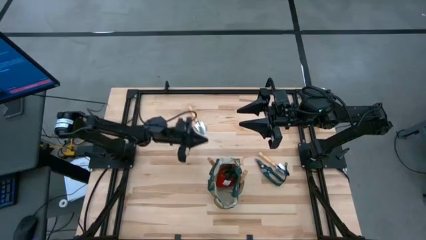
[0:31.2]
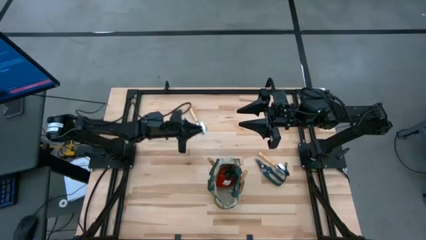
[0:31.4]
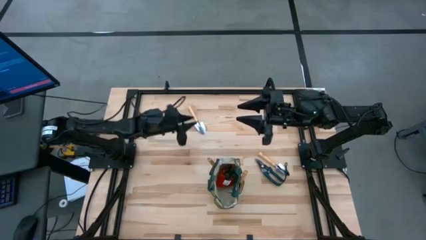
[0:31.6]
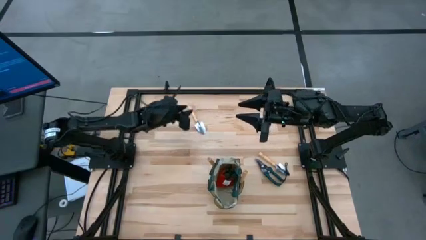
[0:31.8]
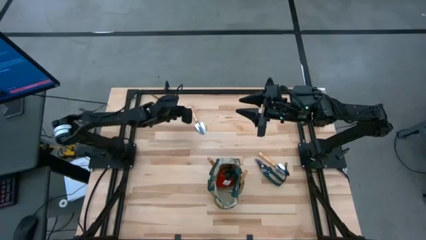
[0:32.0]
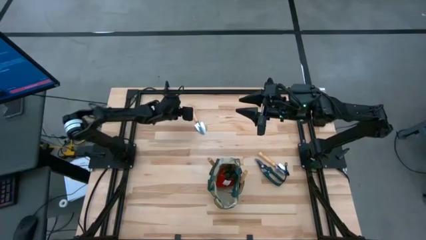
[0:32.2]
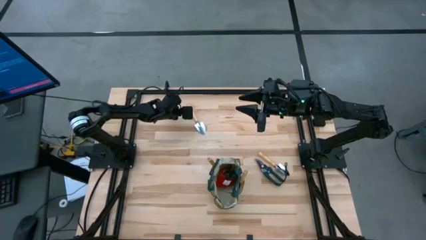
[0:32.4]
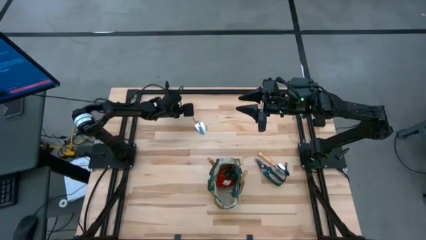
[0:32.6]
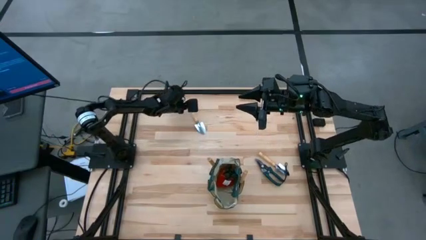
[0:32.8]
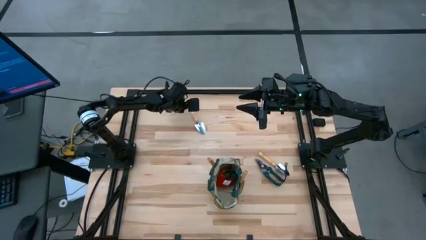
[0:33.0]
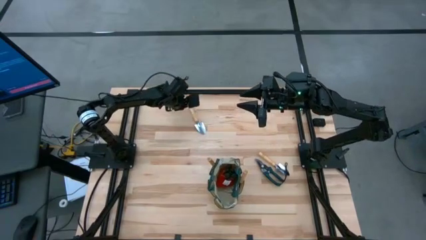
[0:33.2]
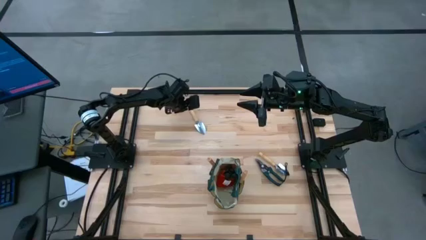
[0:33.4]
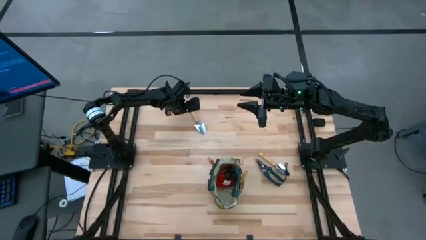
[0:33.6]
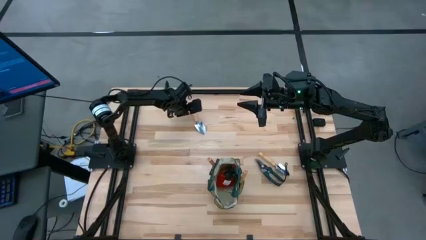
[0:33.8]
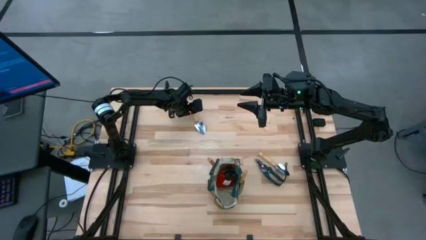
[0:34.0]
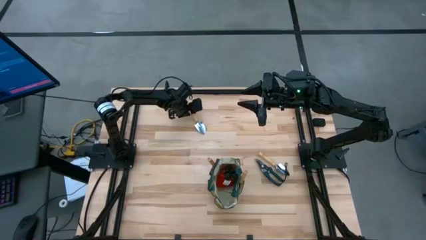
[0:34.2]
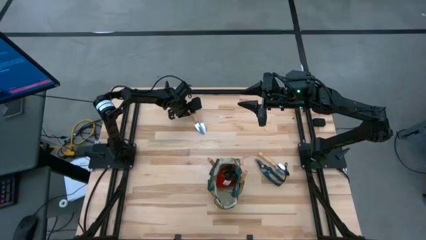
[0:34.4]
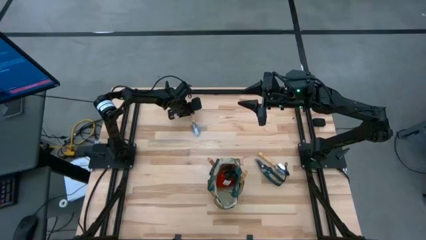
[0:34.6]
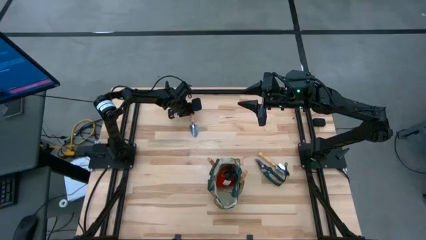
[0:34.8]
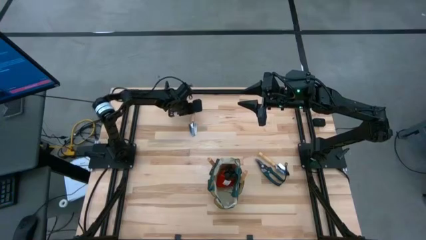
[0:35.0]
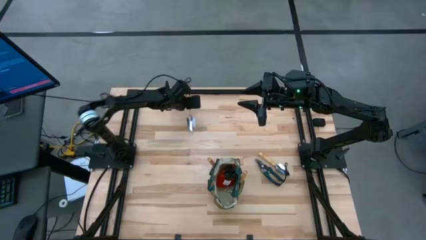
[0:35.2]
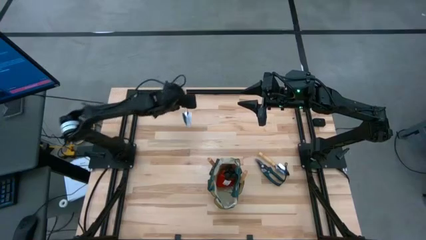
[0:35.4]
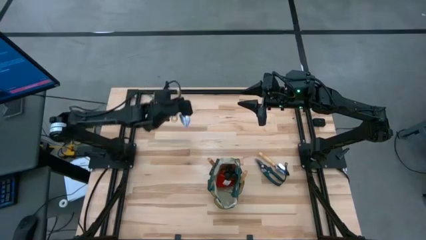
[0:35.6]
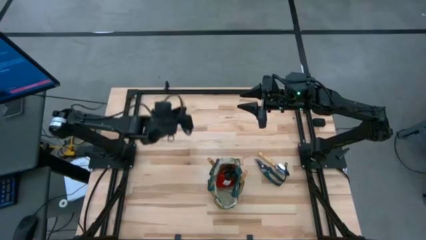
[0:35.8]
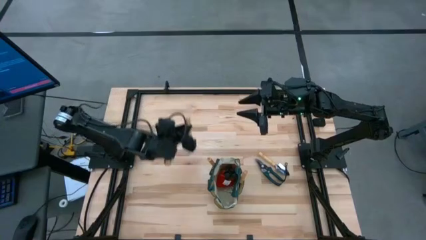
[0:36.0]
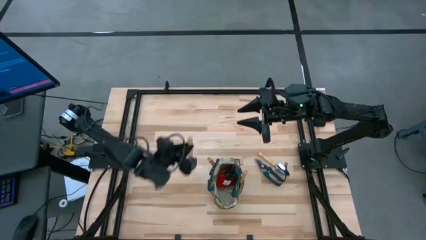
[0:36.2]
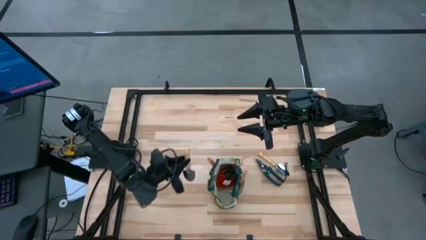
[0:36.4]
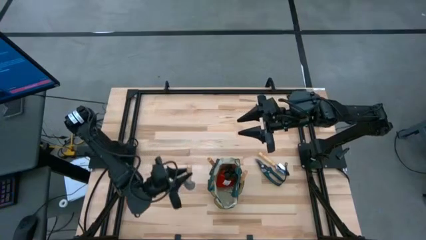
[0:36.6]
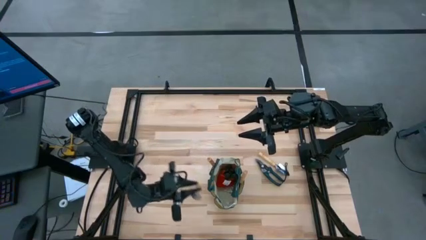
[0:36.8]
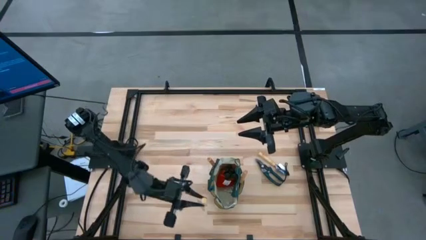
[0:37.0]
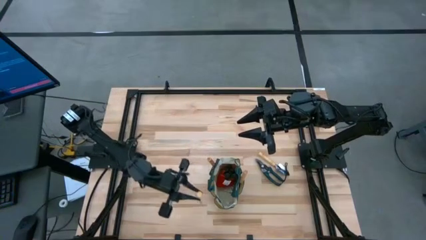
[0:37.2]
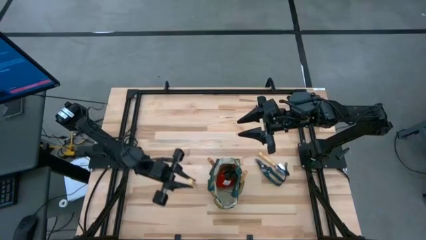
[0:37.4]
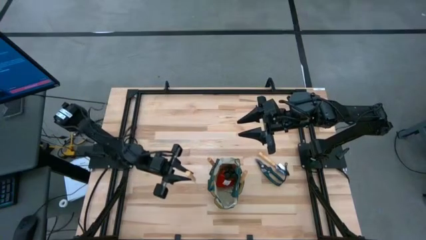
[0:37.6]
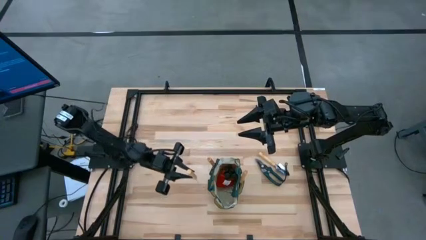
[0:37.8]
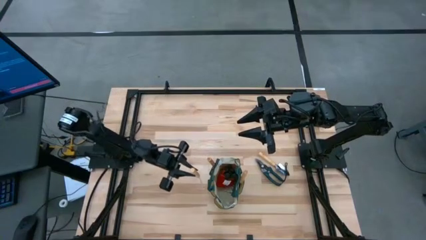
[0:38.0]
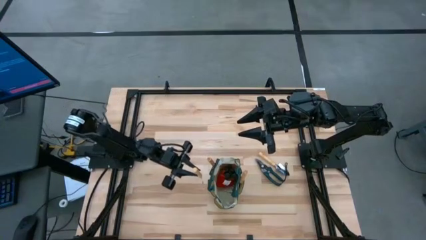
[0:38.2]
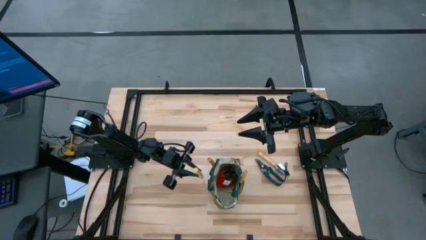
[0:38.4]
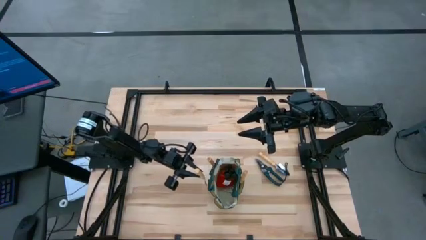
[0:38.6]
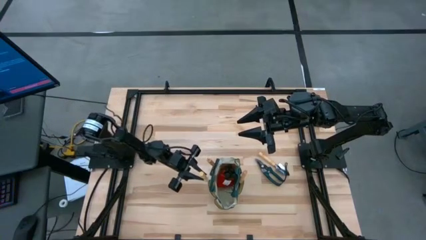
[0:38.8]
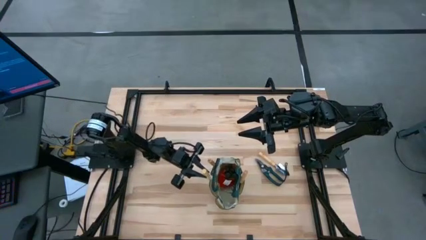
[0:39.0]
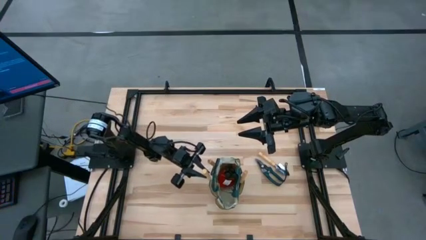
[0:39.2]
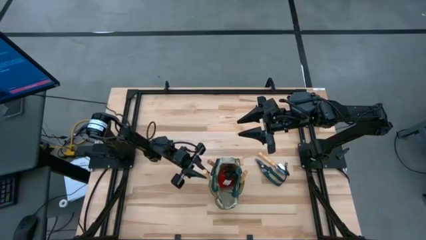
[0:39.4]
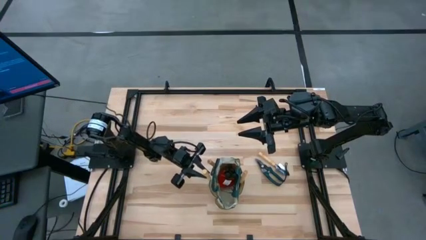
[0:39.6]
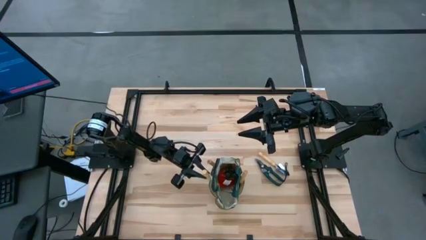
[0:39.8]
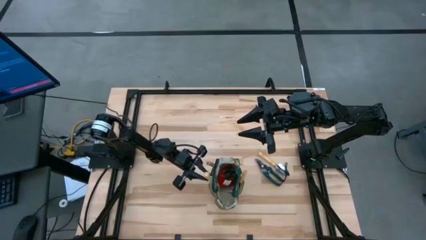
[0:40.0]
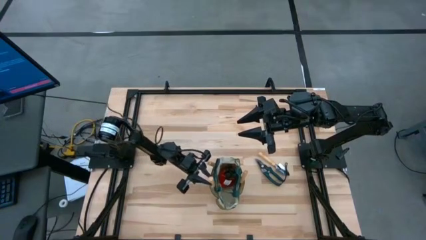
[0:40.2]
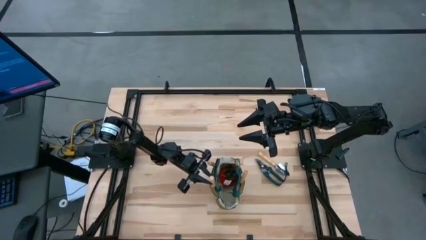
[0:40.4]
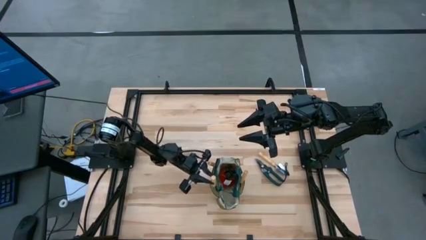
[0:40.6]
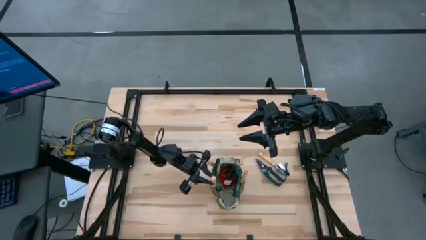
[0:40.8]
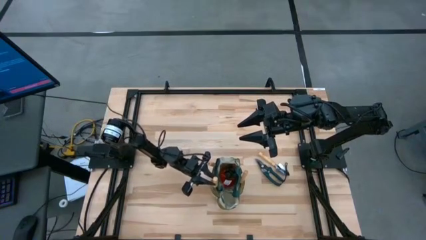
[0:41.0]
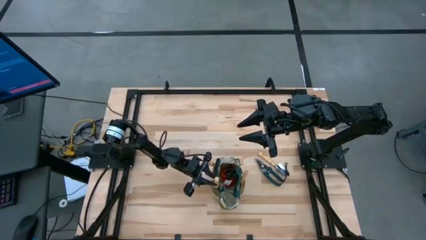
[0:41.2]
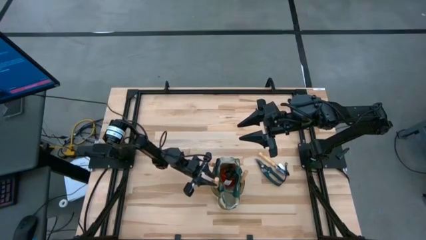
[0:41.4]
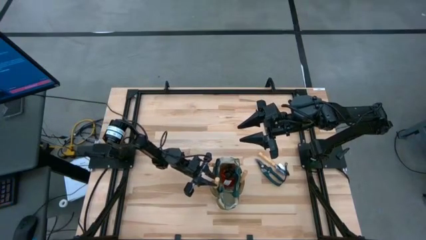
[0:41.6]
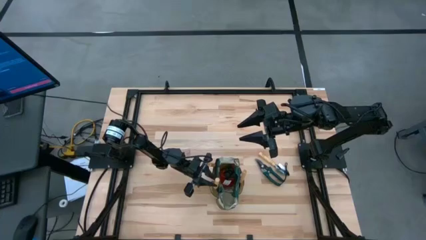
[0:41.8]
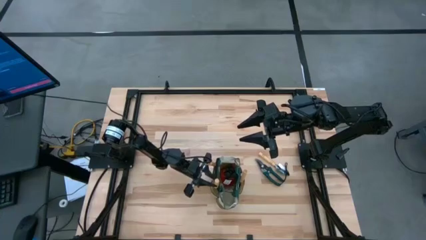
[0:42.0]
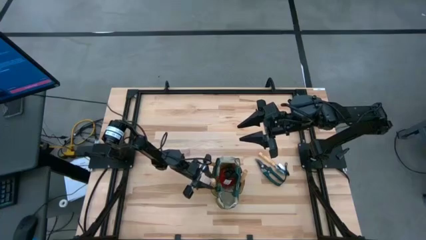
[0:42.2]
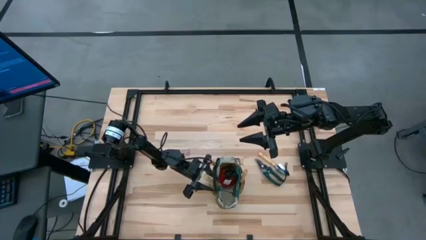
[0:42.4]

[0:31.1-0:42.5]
Task: Pick & Place Garden tools in Gardening bag
Put the brown trowel into the green gardening bag

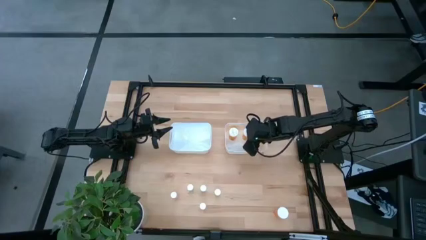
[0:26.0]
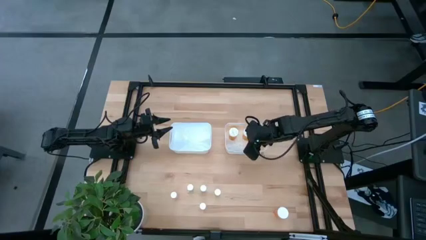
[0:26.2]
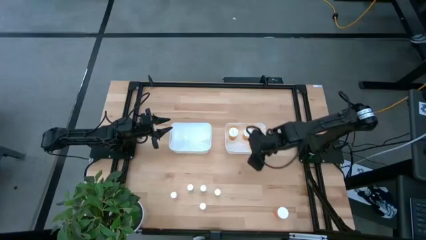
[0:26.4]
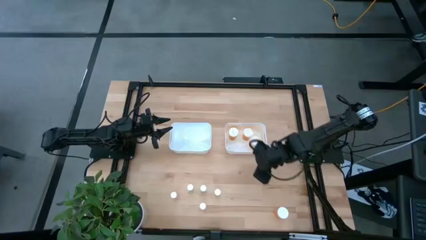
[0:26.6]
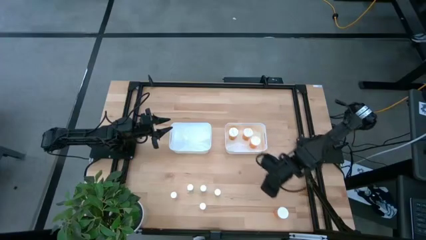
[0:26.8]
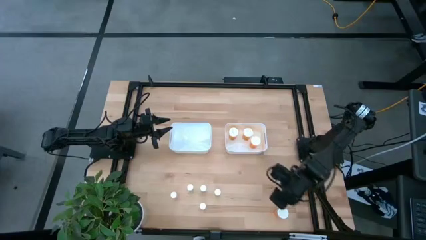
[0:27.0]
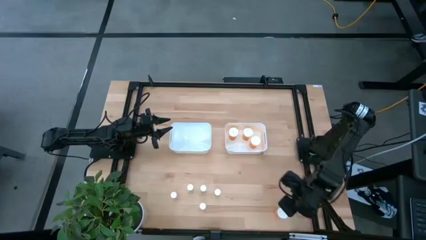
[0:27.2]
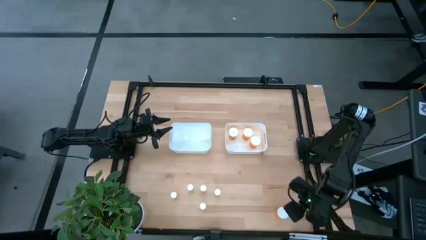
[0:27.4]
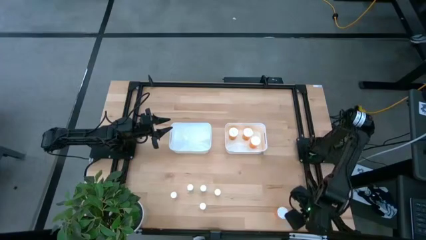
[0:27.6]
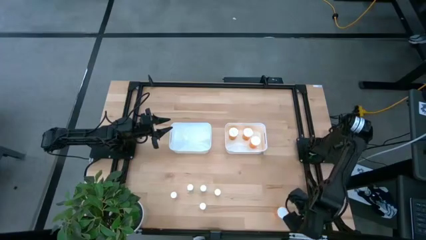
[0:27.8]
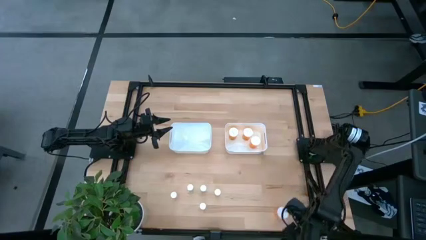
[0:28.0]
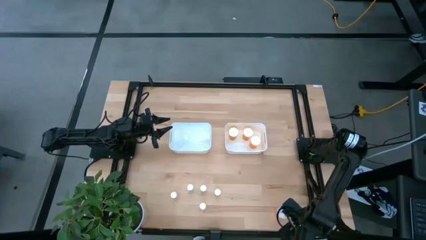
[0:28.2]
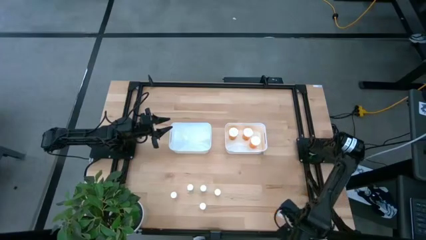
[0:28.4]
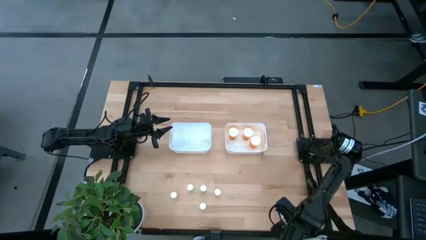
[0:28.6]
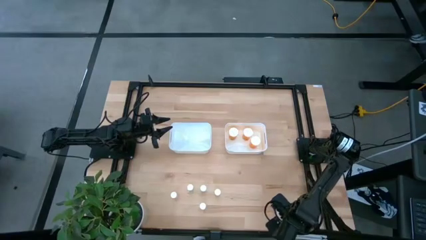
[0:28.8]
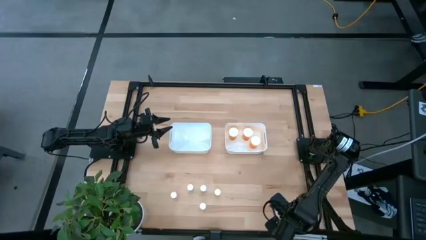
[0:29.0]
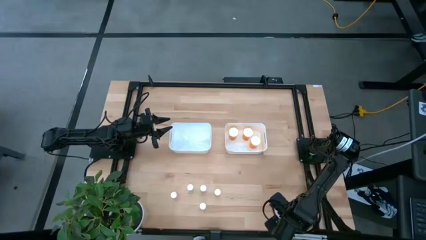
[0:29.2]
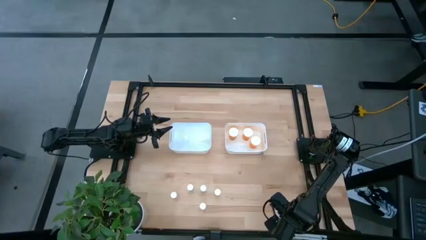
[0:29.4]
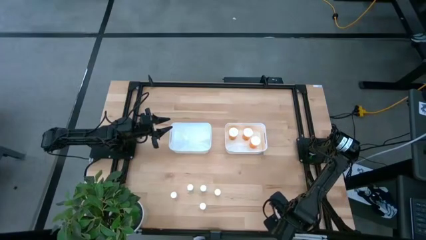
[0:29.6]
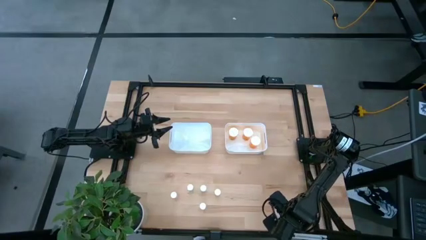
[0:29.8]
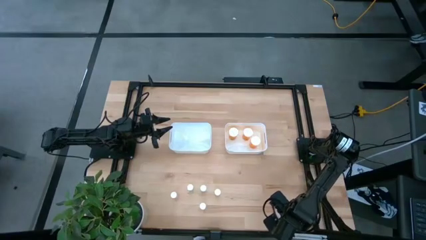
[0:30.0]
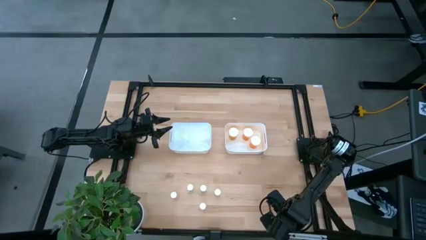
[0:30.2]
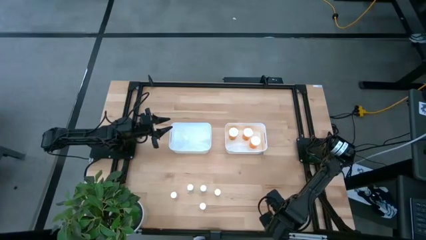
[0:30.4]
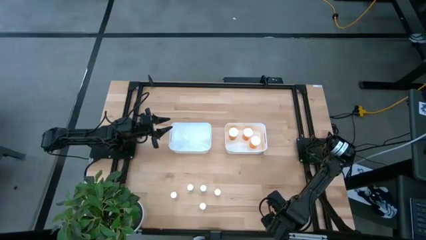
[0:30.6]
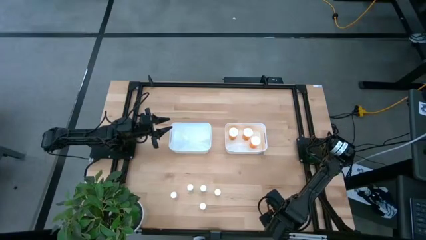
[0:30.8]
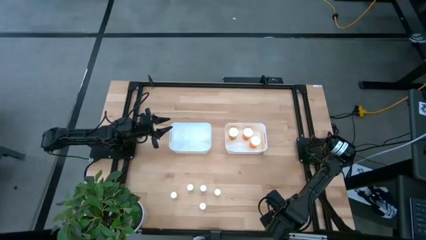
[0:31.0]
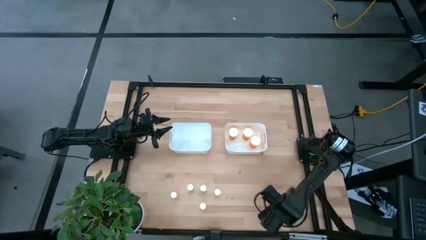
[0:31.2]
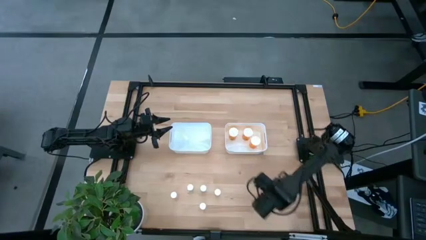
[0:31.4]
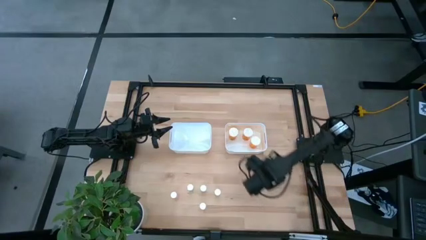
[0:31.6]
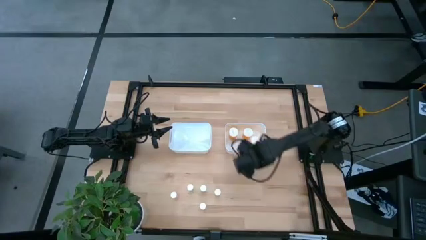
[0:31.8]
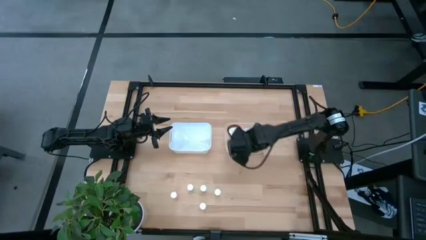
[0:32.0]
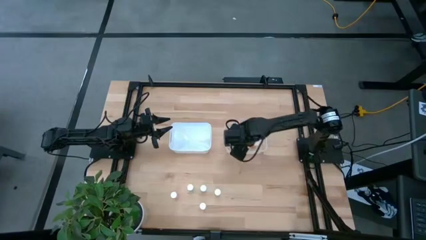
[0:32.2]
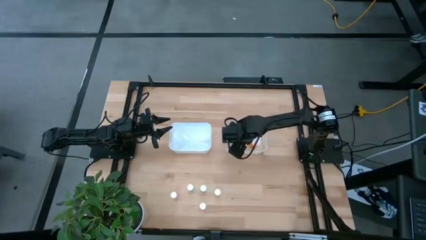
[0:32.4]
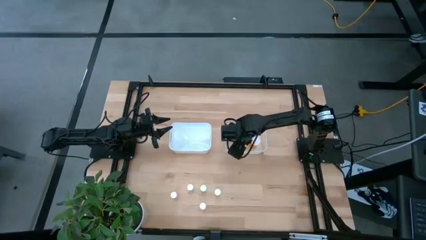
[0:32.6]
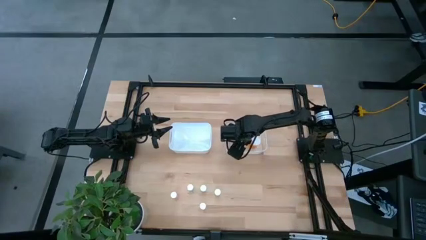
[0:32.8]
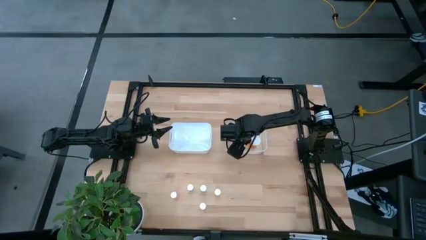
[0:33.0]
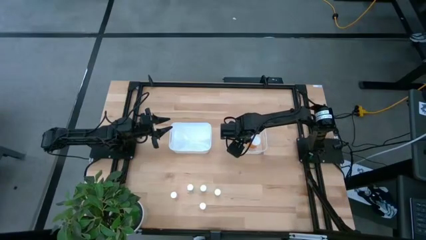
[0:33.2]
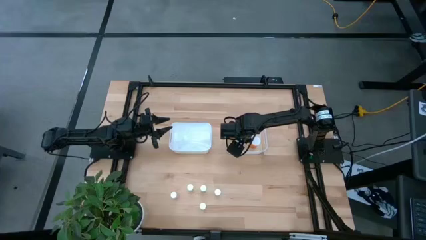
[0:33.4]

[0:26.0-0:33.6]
Task: Pick and place medicine bottles into bin by pill shape (circle, oval)
Put the large orange pill bottle into the right white bin
